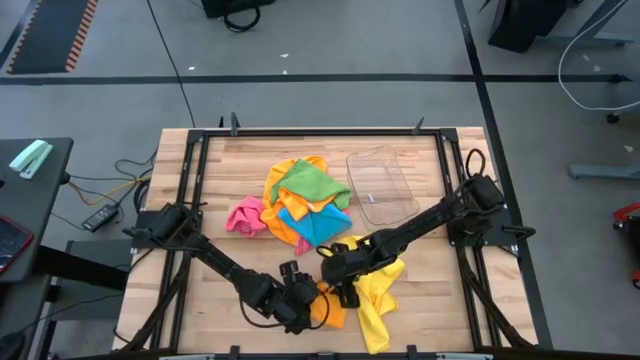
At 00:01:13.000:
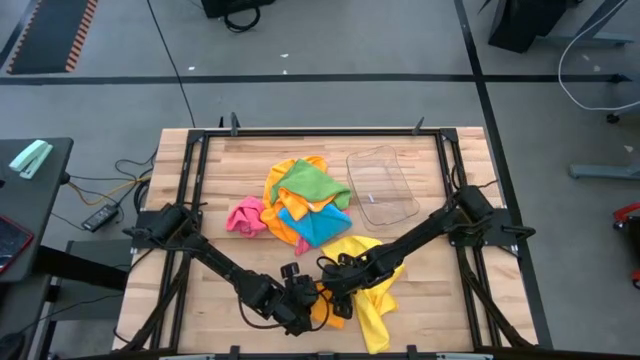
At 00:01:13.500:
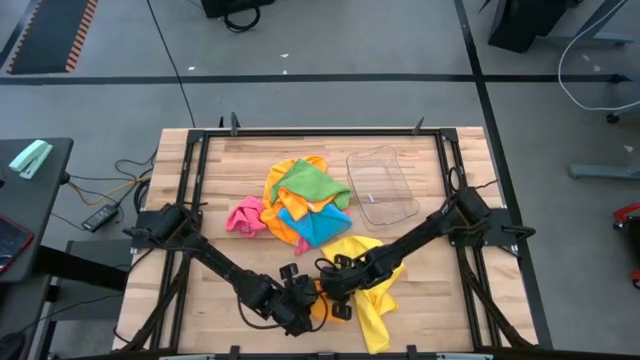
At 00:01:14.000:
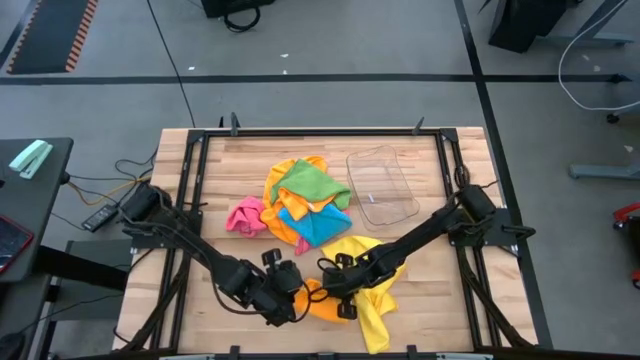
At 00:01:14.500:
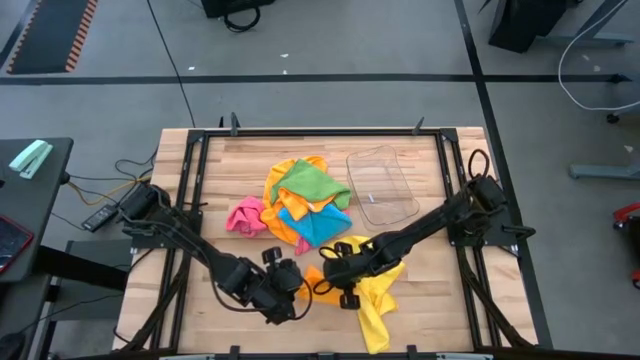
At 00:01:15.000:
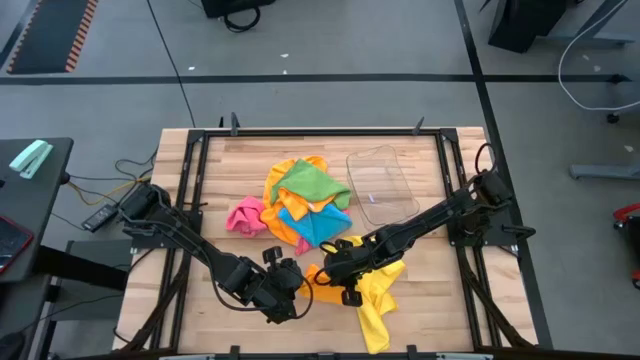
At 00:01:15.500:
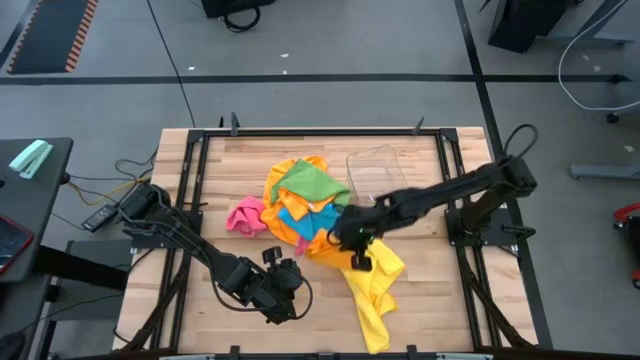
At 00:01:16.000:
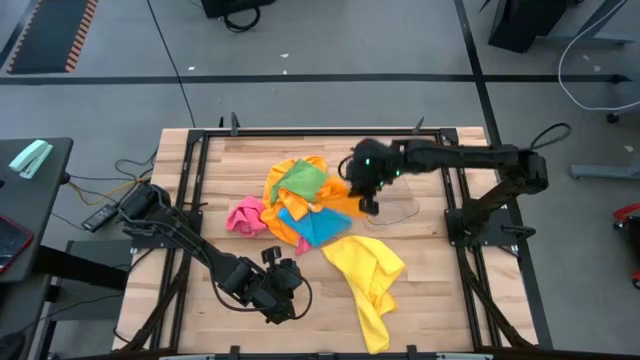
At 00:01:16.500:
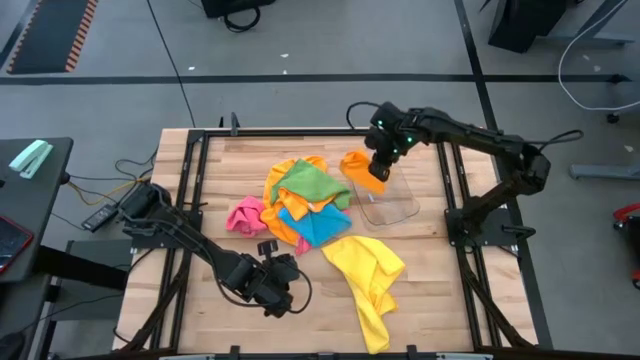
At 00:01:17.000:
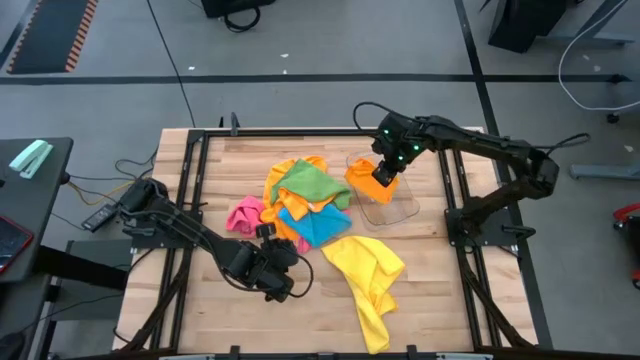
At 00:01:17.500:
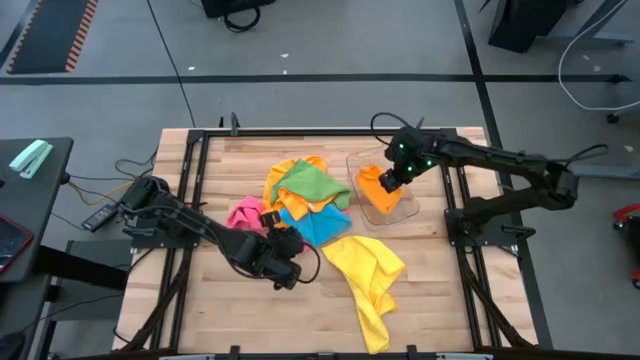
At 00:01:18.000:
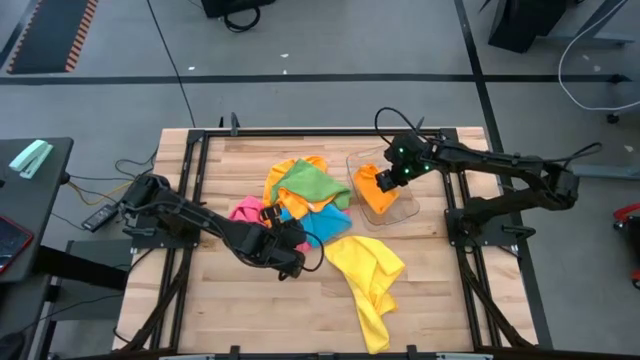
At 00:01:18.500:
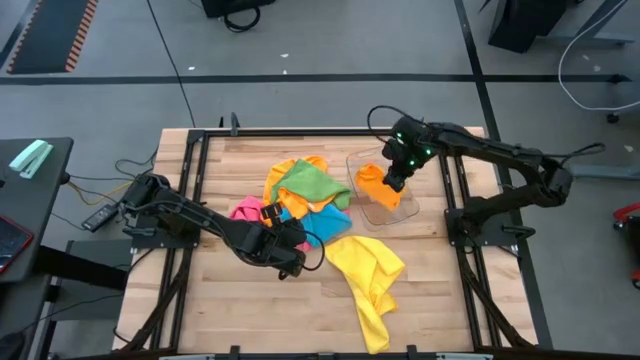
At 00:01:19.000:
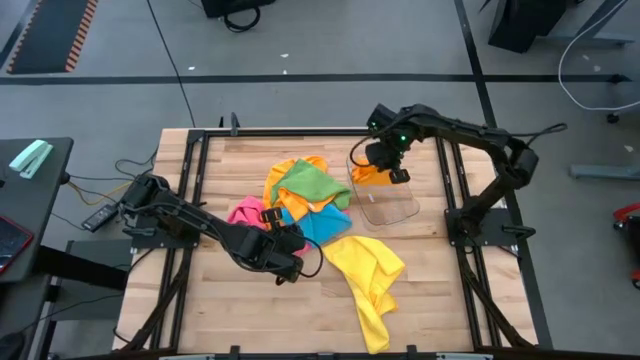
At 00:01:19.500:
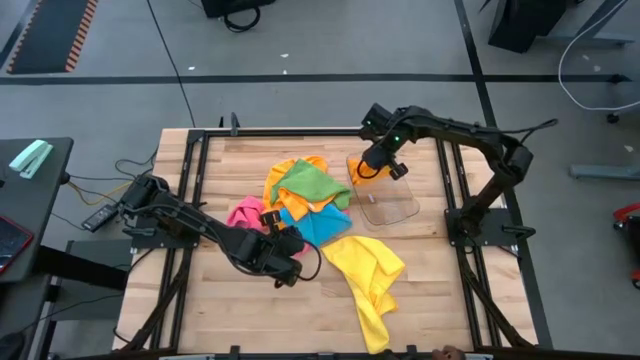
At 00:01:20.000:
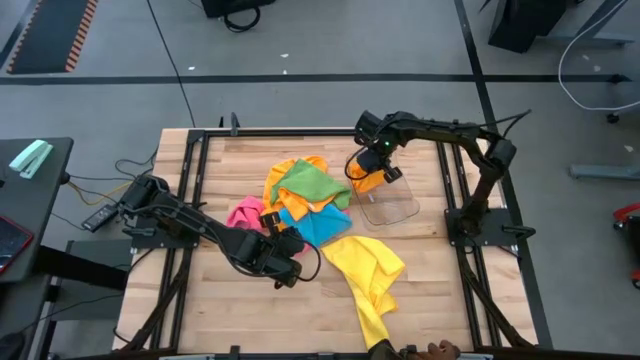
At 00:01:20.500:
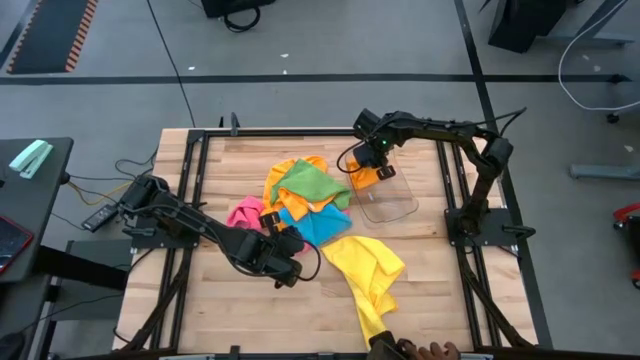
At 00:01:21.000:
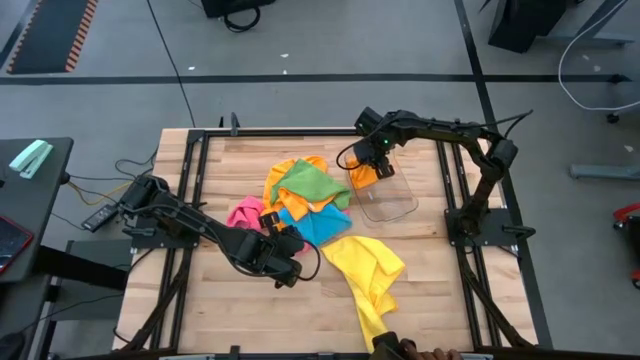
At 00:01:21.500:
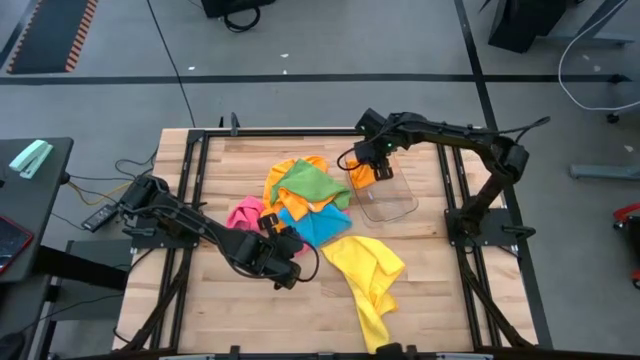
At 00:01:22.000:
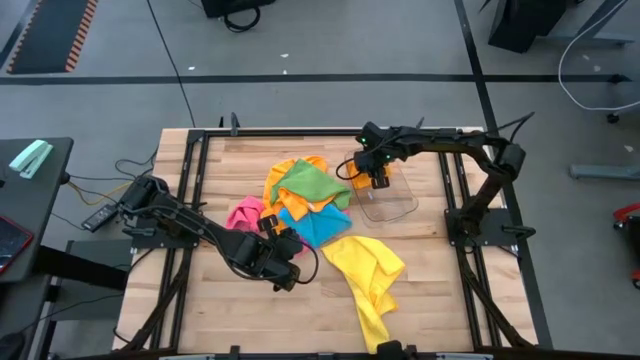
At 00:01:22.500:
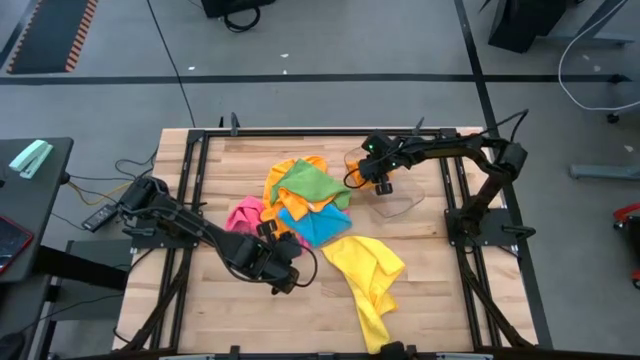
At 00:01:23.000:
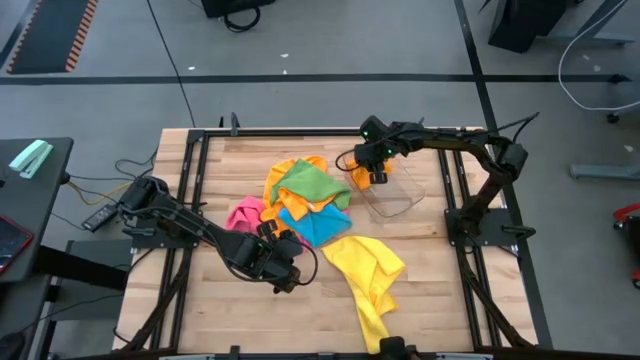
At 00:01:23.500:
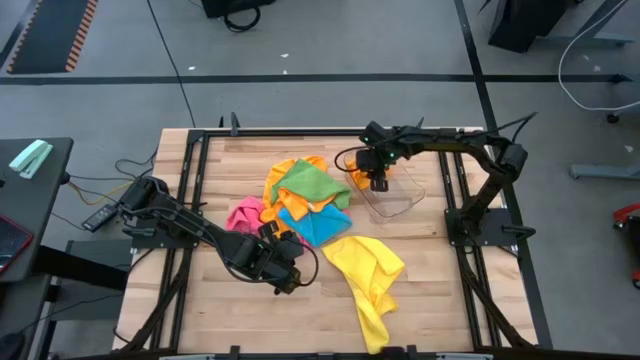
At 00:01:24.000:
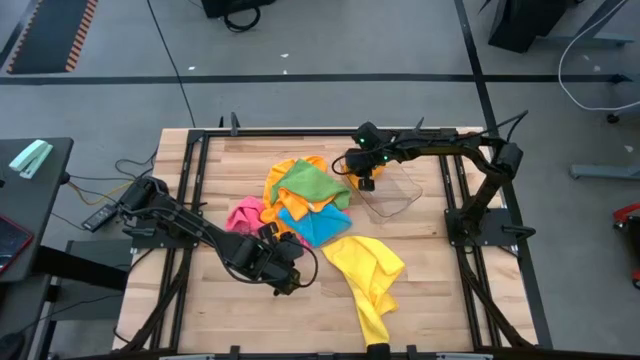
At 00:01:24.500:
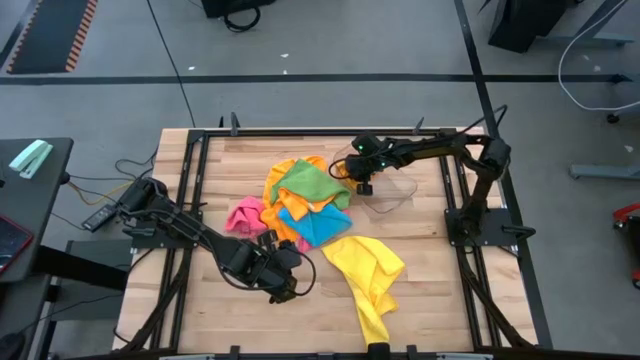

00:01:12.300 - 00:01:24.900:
Task: Fold microfiber towels
Put the bottom orange towel into the transparent bin

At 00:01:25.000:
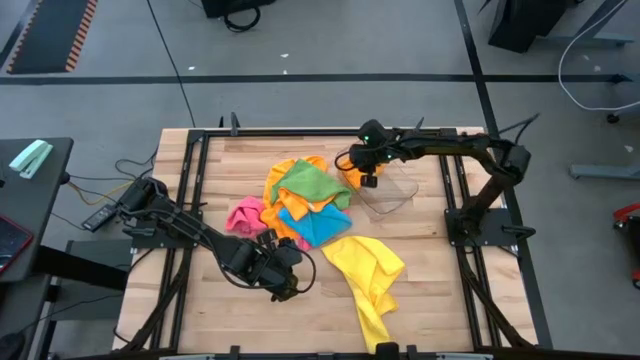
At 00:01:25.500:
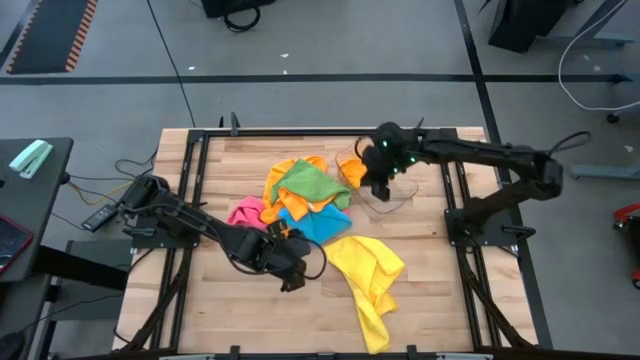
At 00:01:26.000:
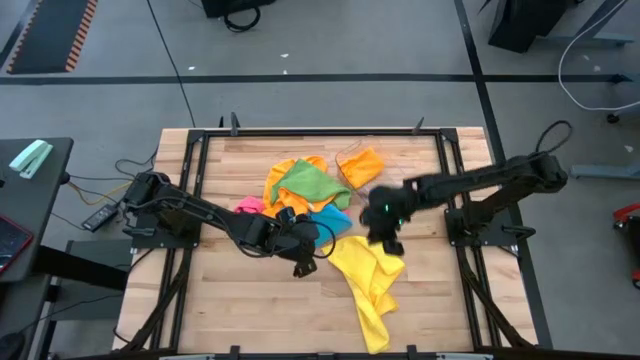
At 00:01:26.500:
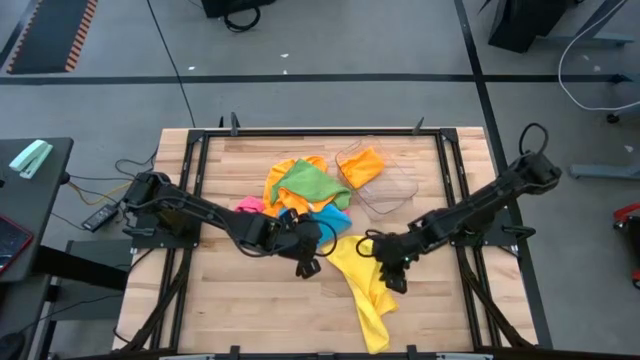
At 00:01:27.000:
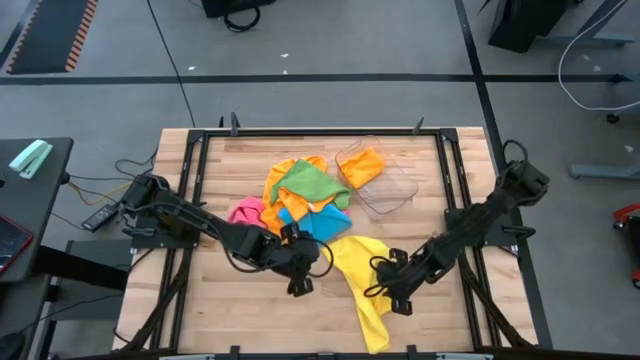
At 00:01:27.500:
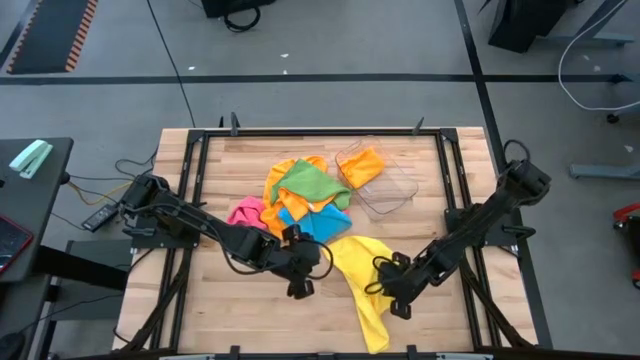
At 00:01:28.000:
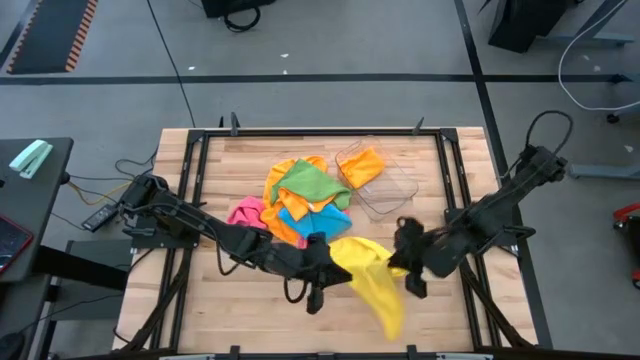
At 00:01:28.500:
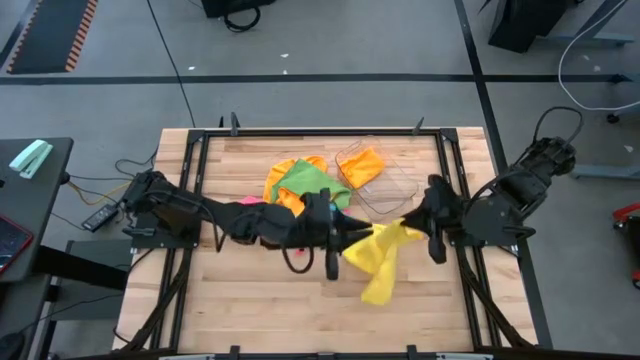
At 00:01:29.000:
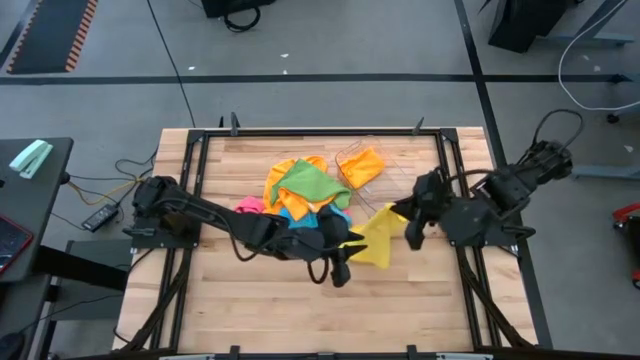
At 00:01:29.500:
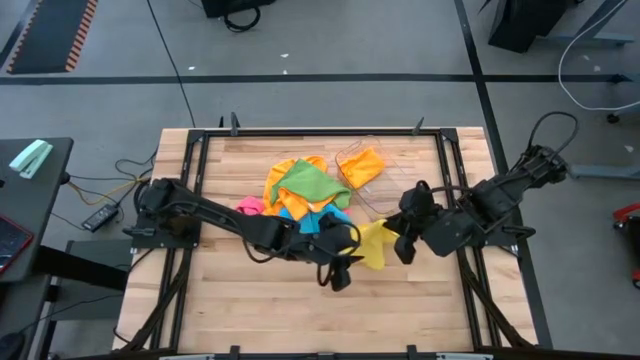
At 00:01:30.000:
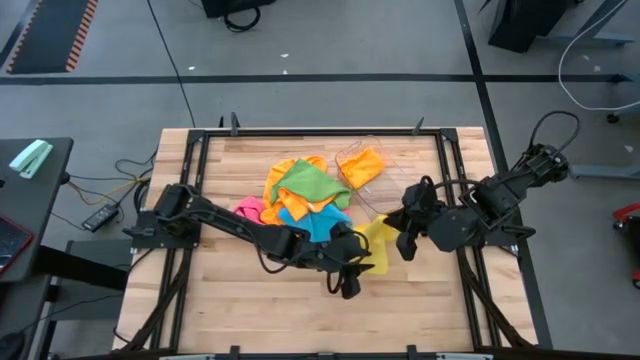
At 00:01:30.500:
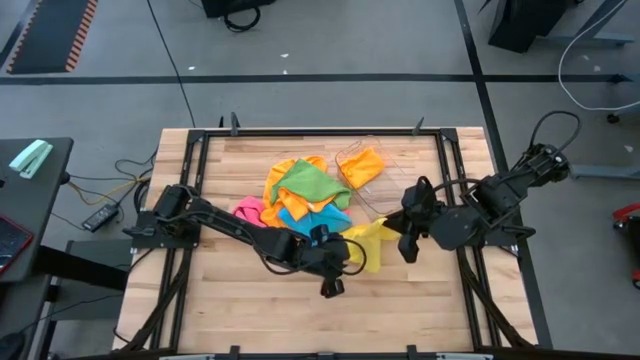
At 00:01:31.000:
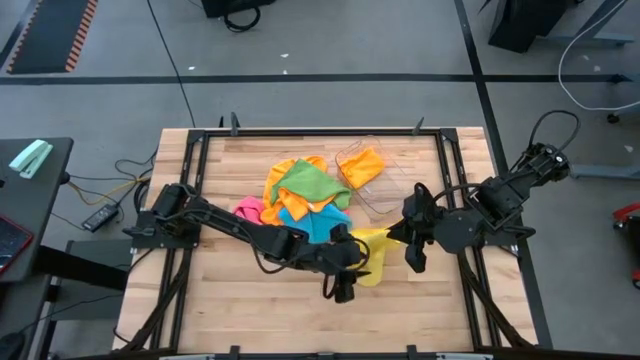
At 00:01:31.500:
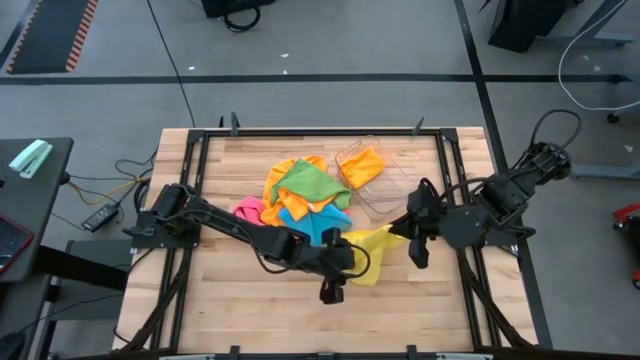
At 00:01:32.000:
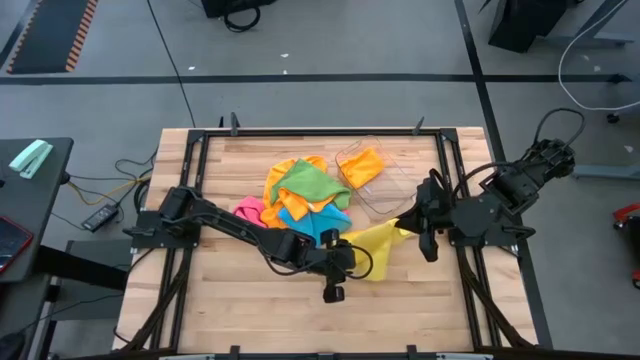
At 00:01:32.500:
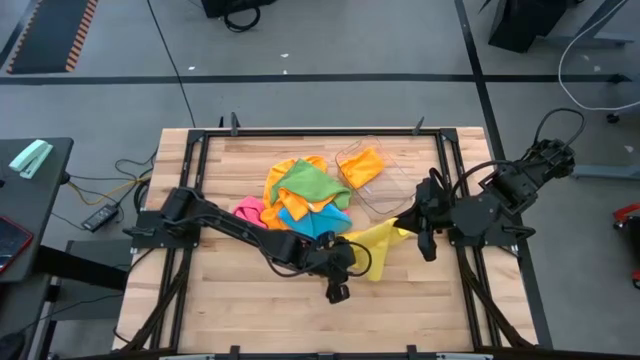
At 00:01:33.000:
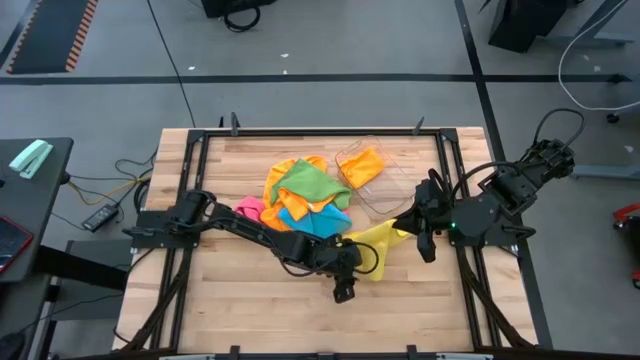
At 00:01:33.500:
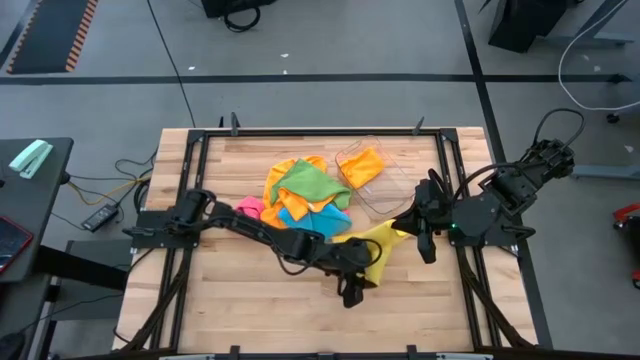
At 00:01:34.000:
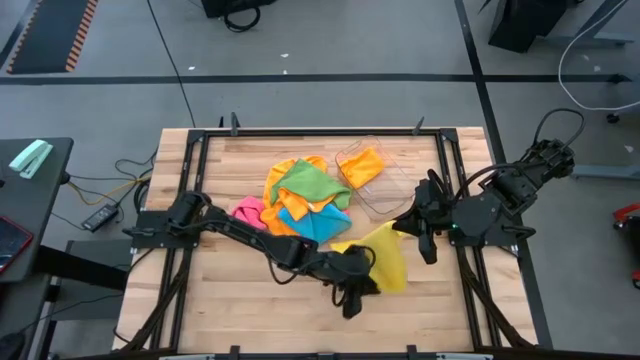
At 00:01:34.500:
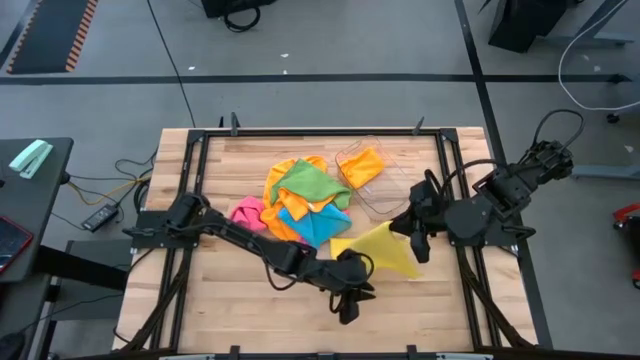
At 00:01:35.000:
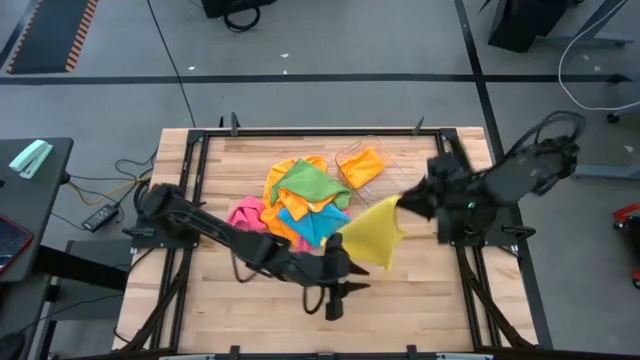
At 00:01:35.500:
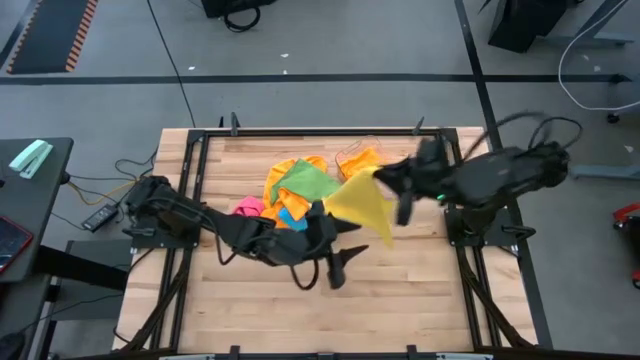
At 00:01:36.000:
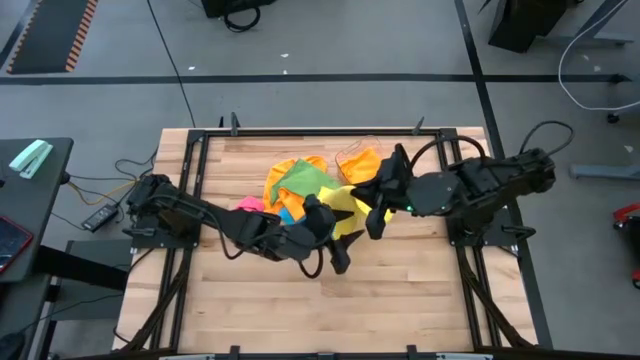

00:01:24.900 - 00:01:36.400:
Fold the yellow towel
